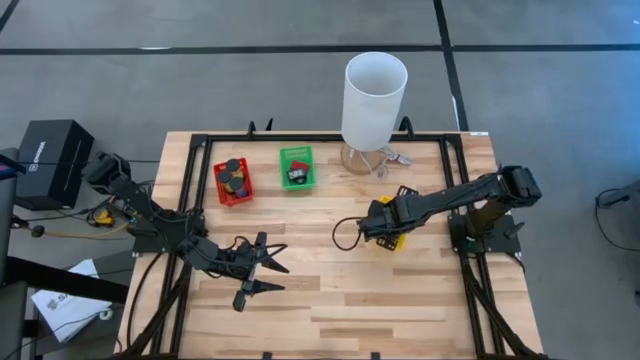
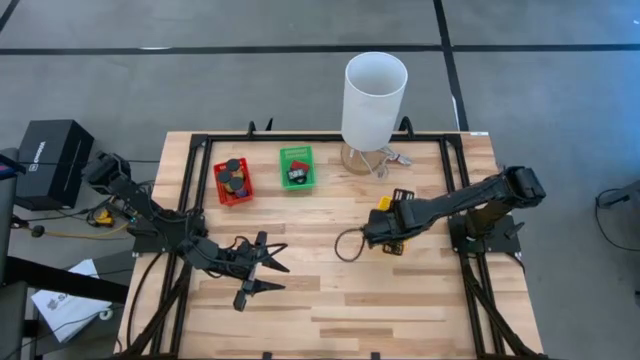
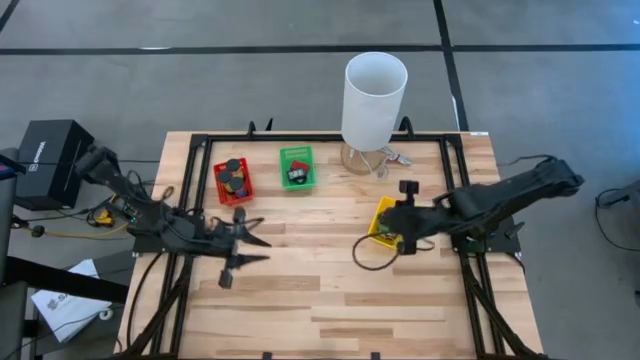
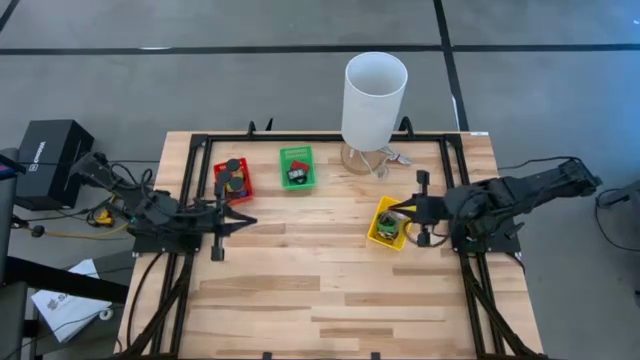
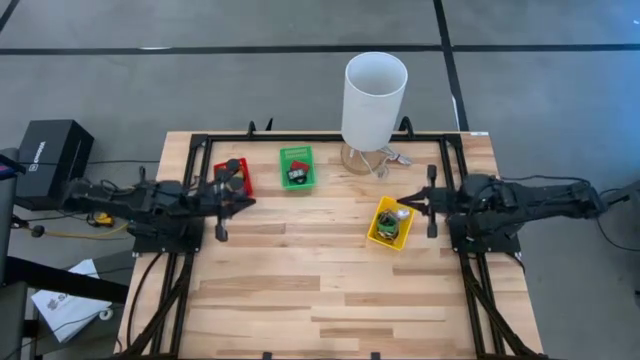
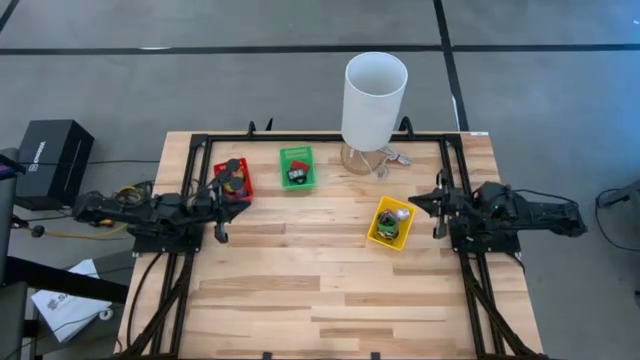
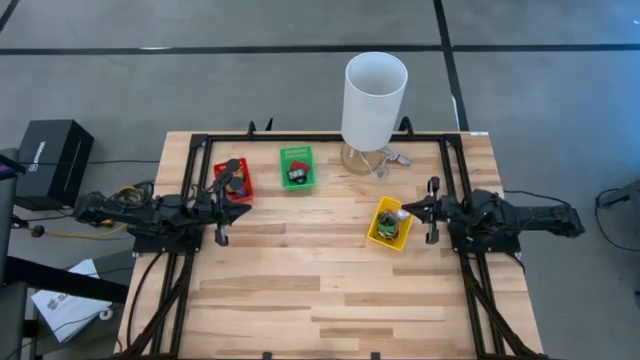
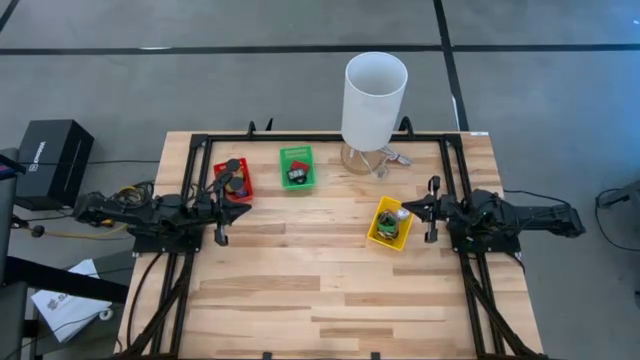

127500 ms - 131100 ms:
Task: Pick & Place Office items
Return to Home Position

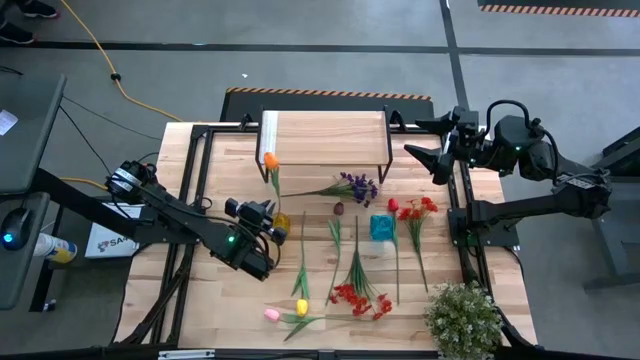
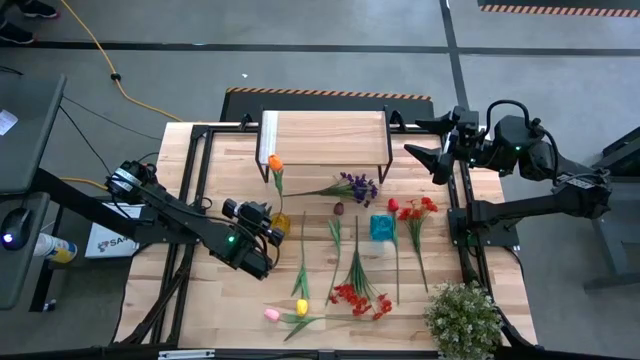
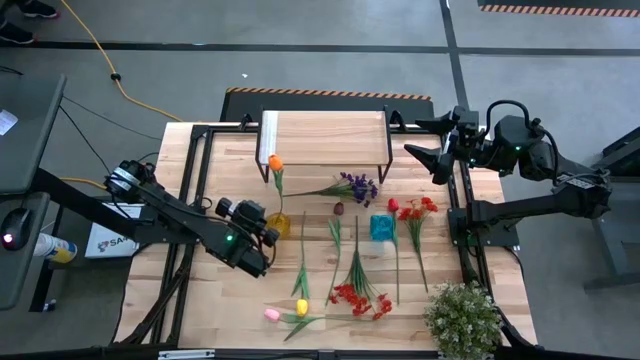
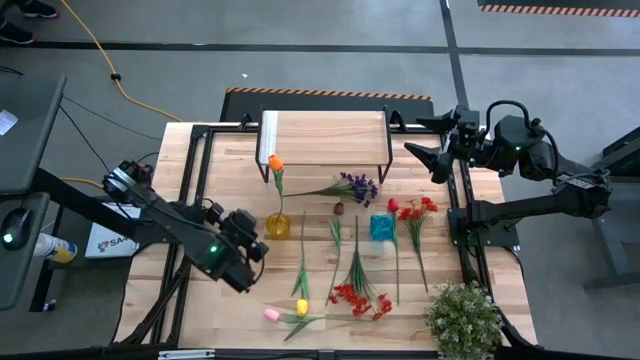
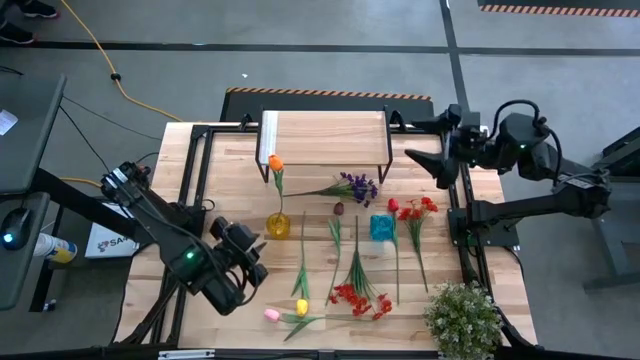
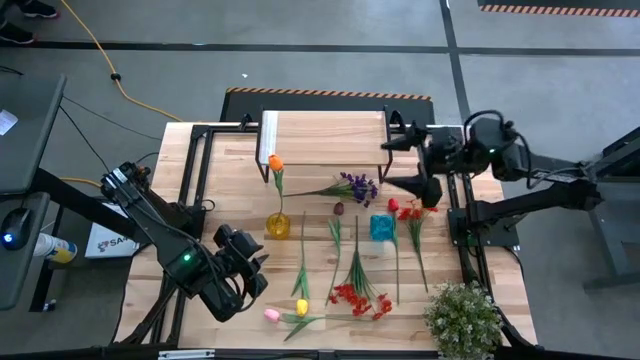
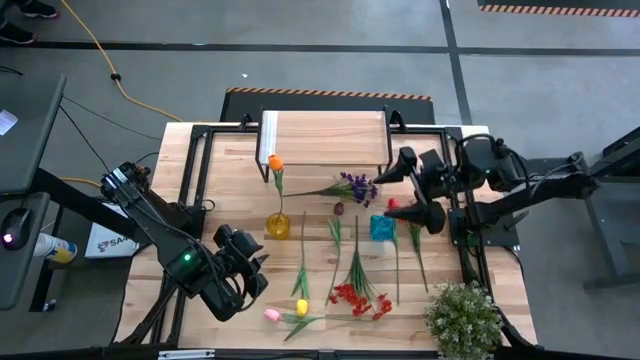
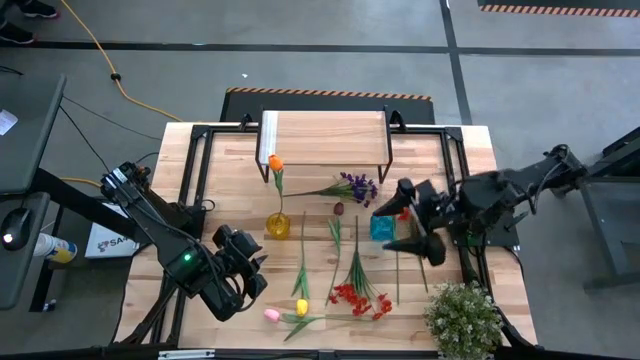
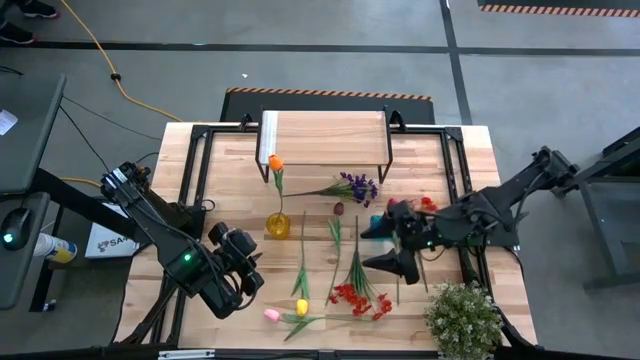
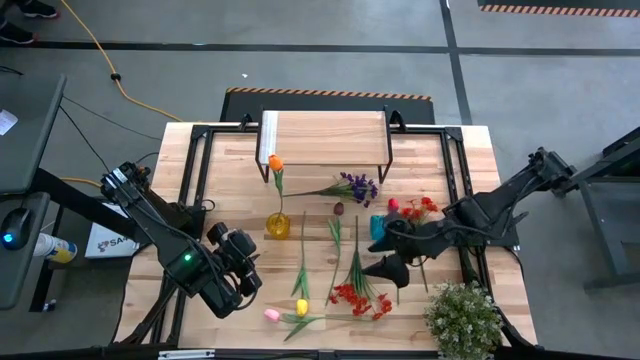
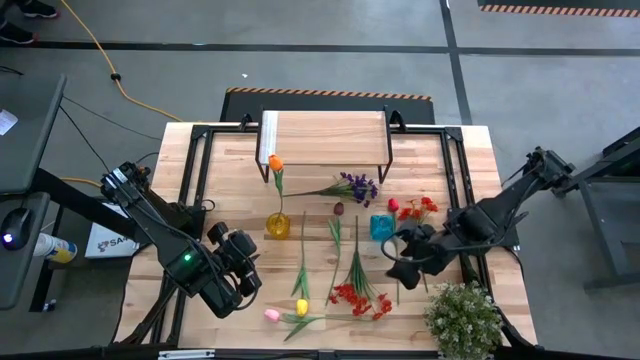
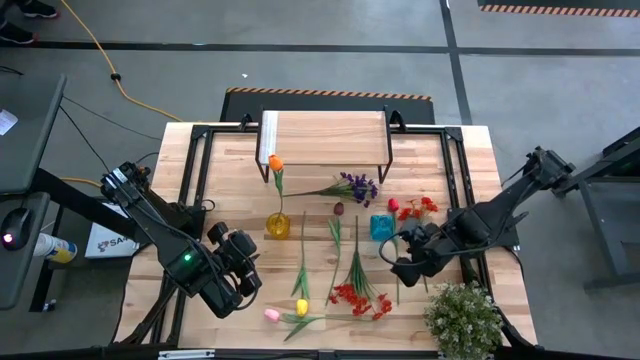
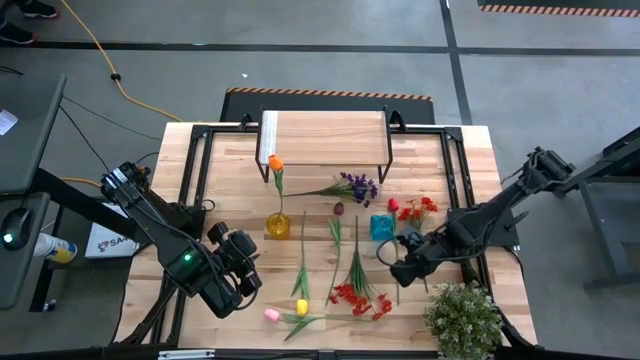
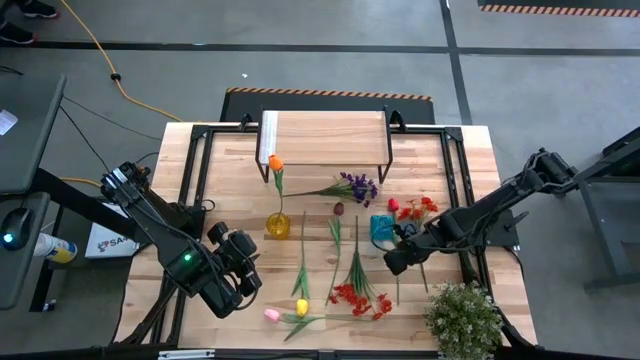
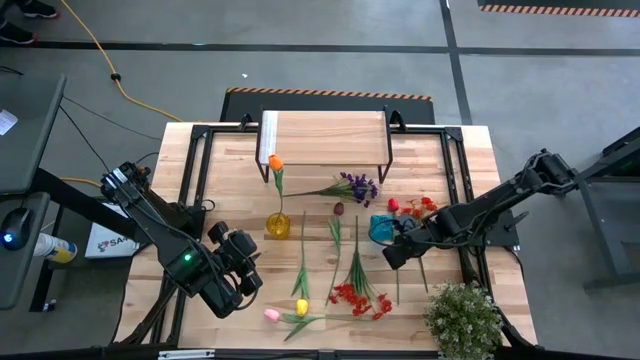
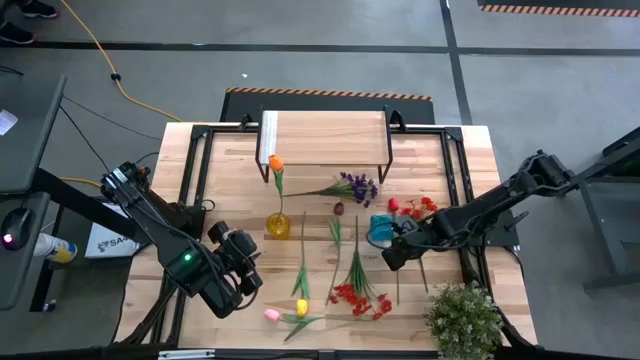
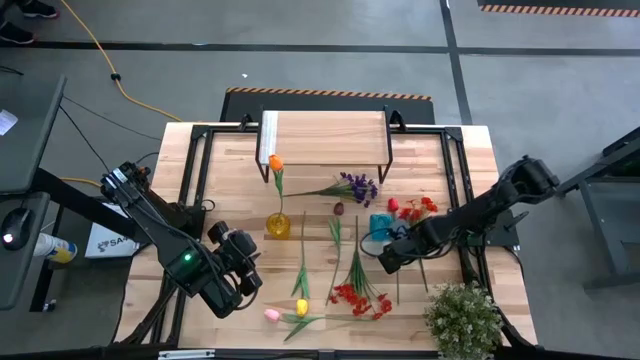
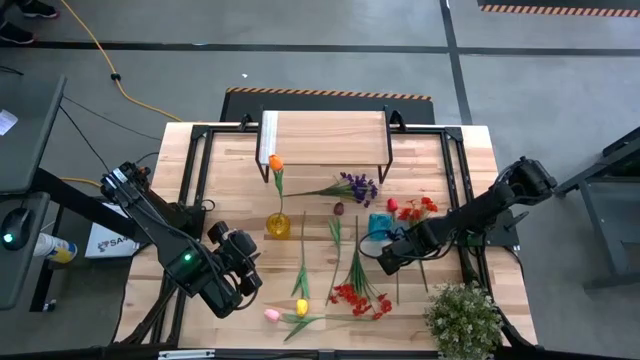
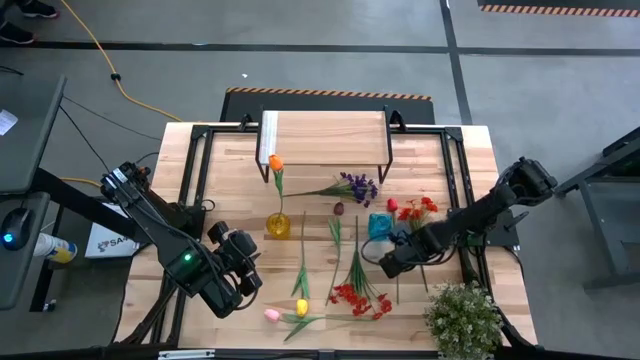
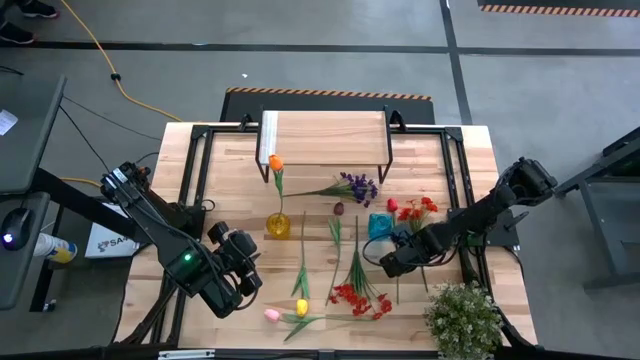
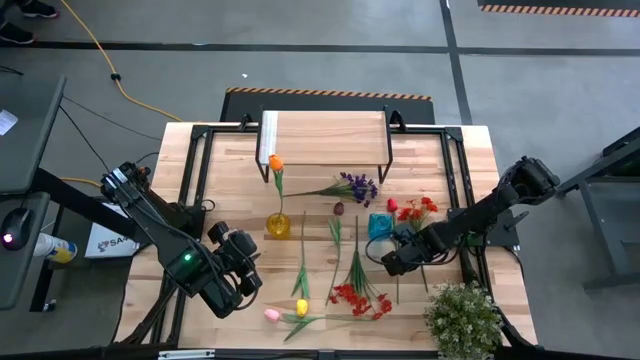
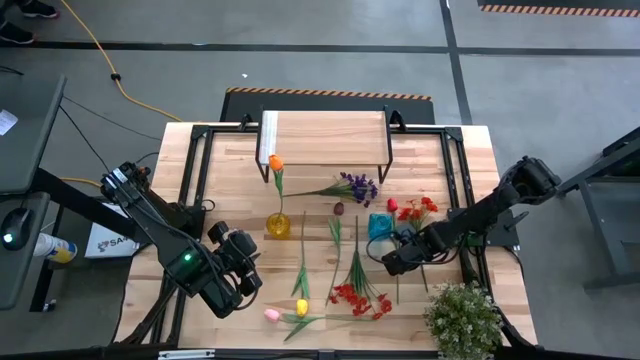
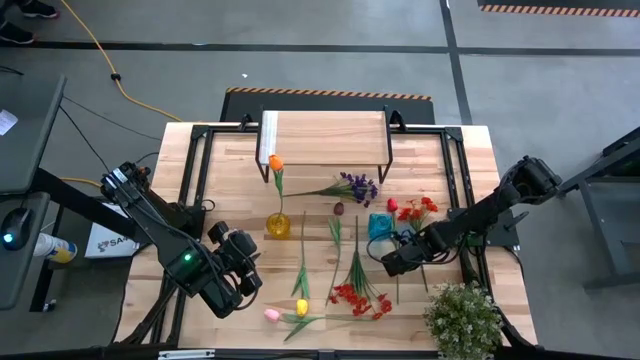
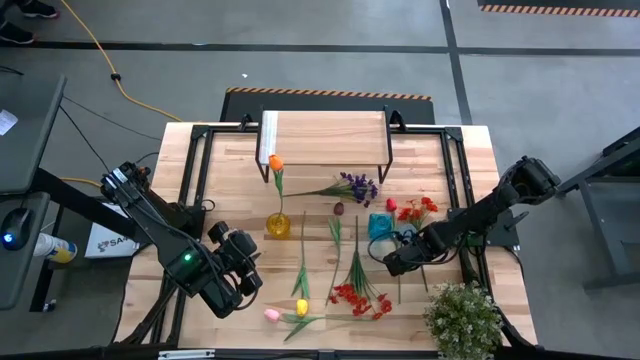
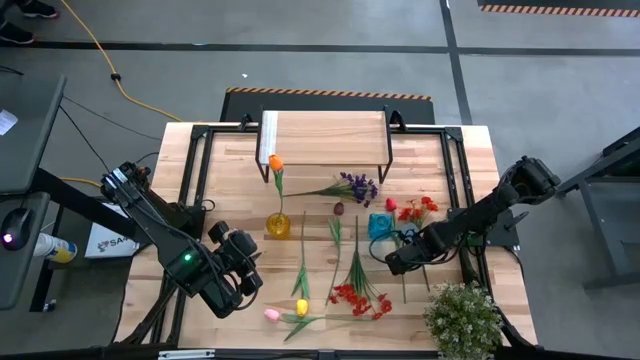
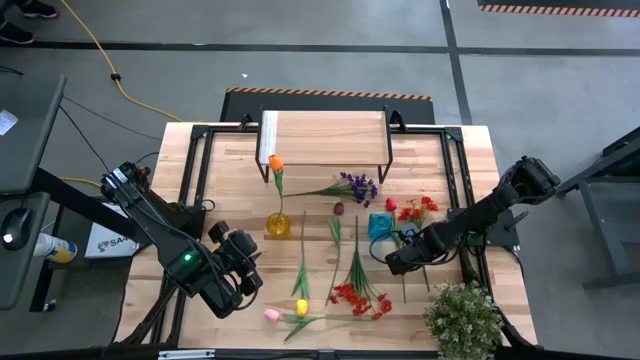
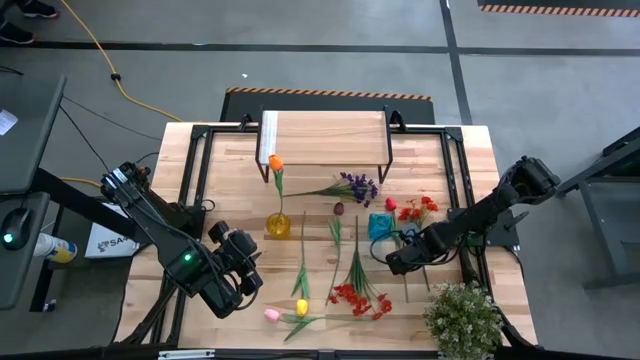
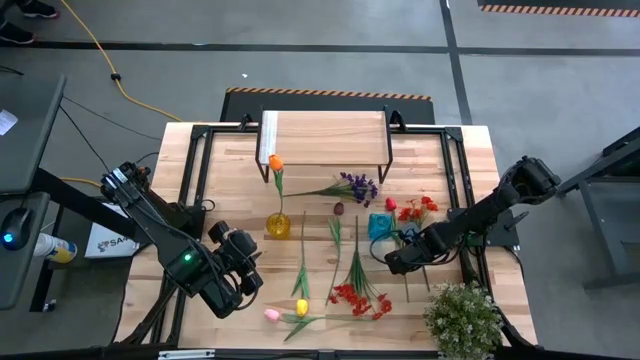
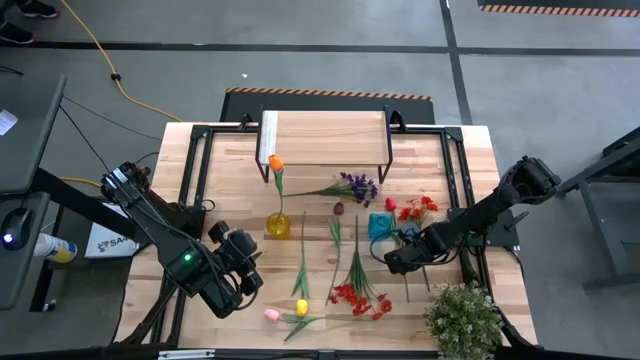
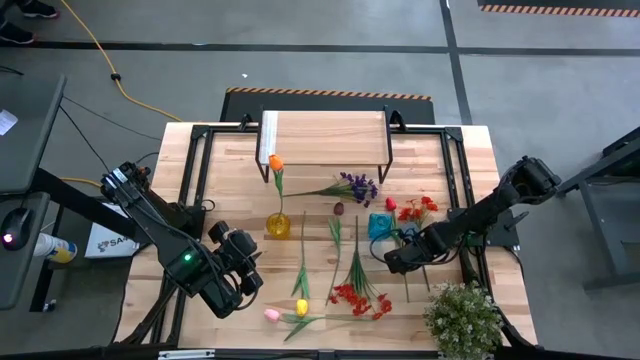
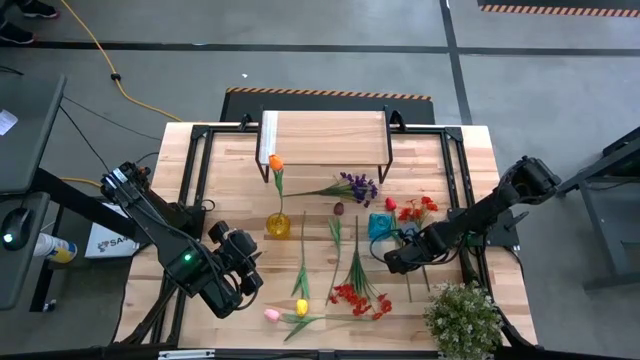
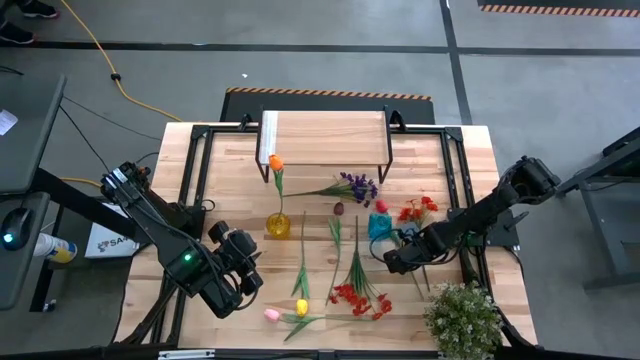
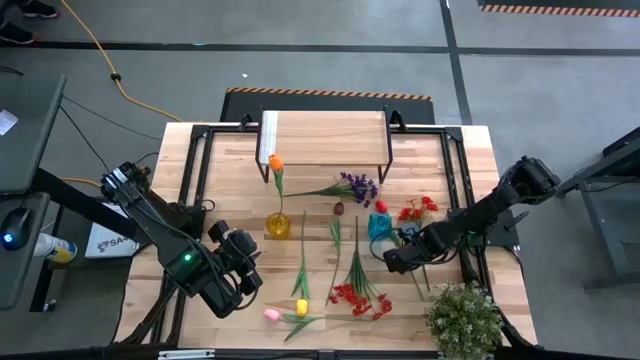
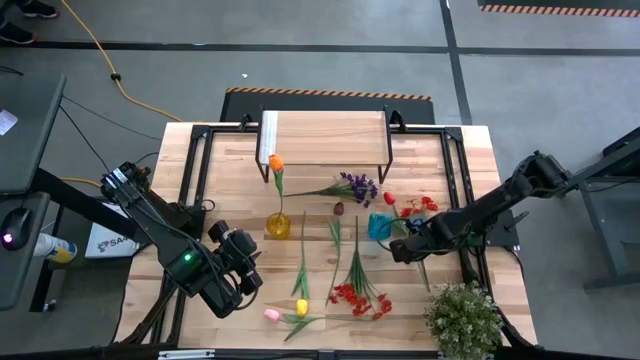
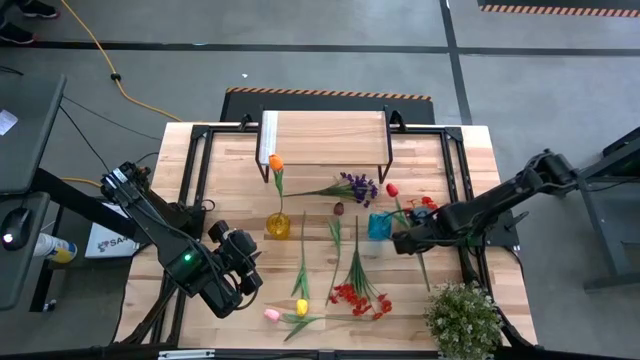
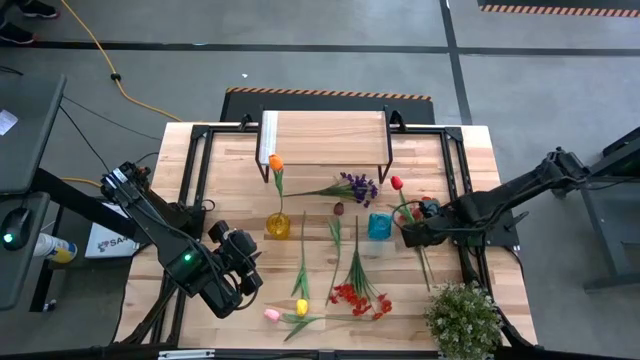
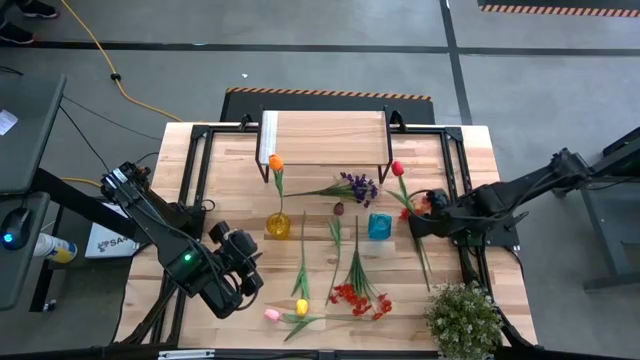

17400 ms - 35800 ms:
Task: Pick and place flowers into a vace then onto a shelf
Put the red tulip into the yellow vase
